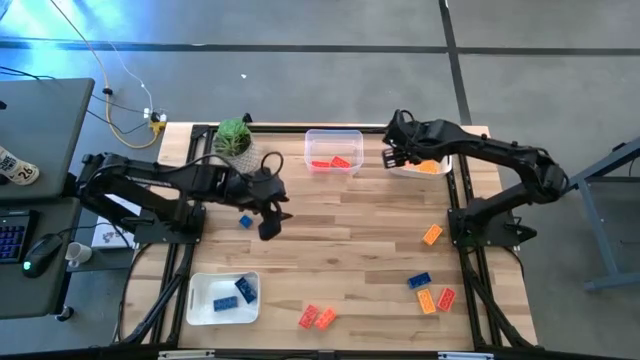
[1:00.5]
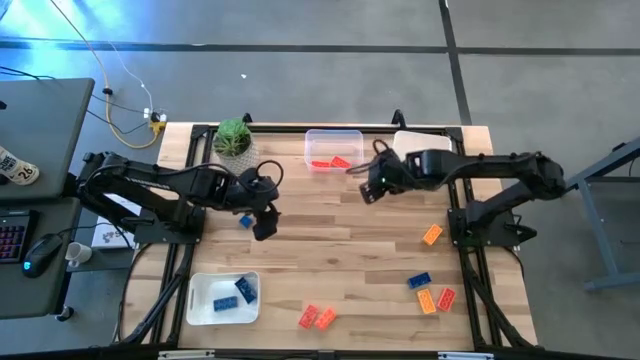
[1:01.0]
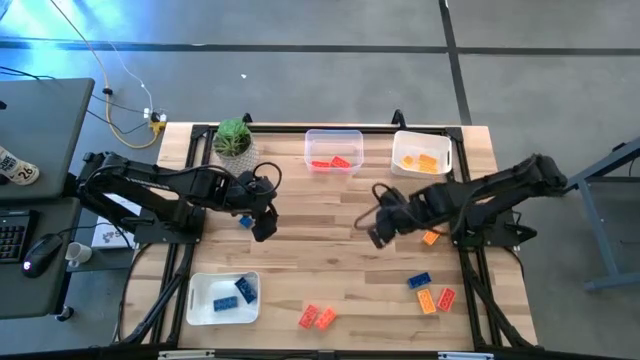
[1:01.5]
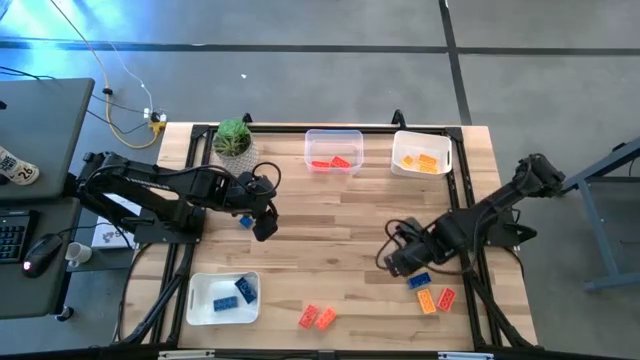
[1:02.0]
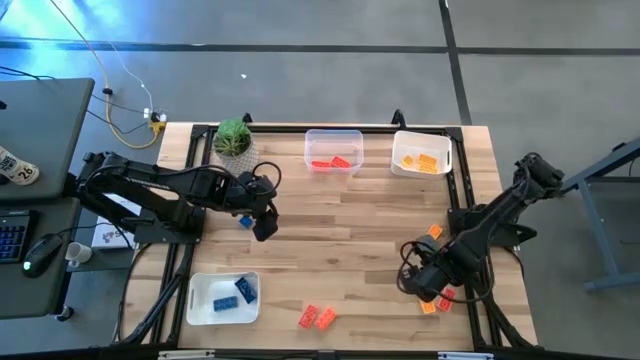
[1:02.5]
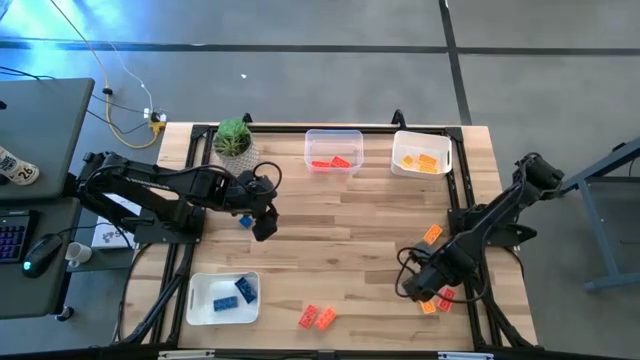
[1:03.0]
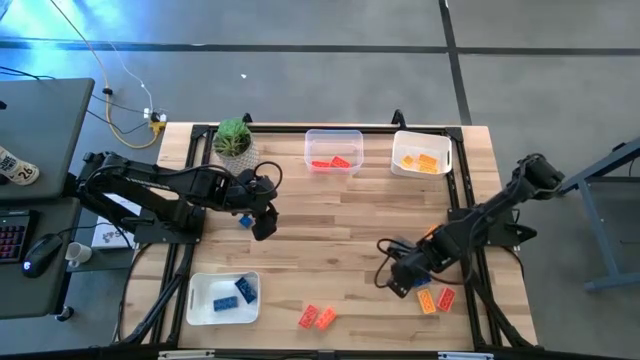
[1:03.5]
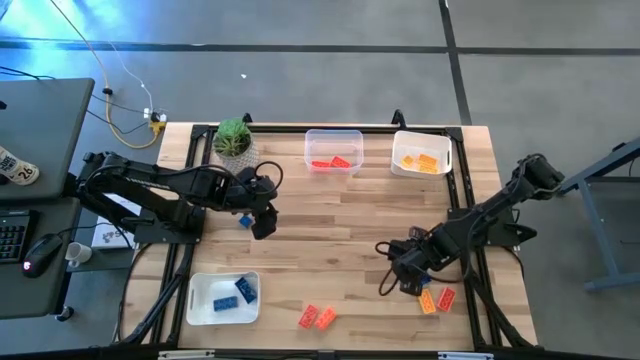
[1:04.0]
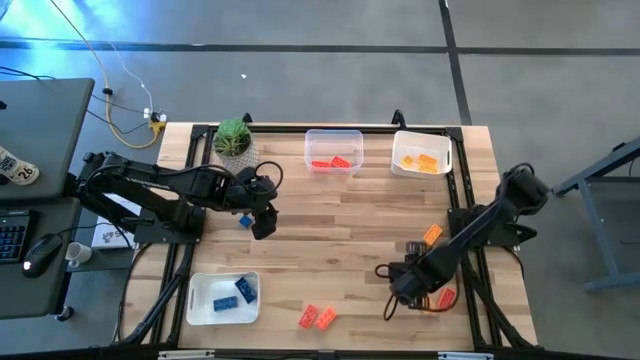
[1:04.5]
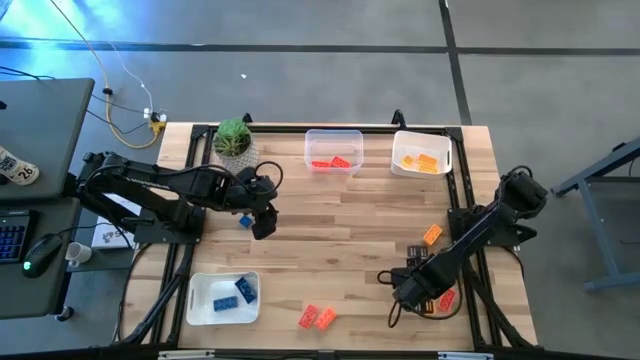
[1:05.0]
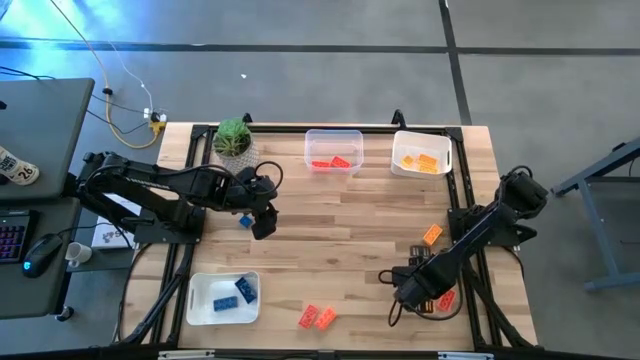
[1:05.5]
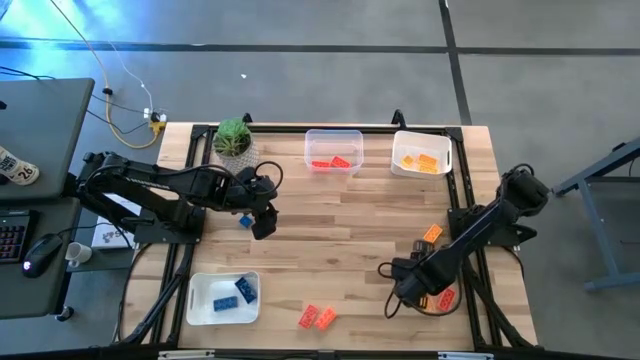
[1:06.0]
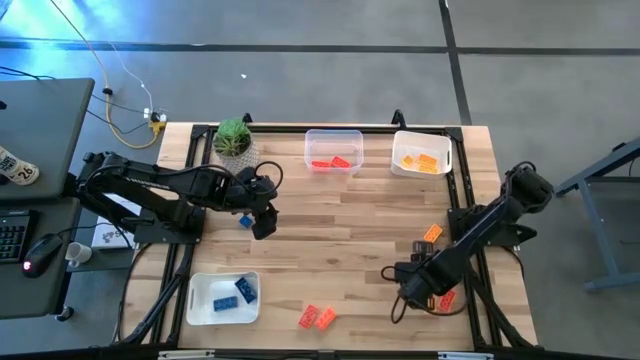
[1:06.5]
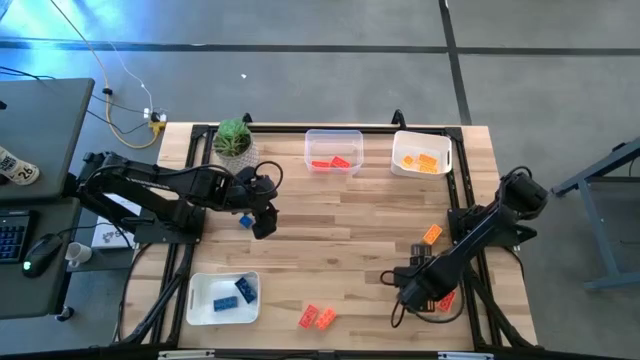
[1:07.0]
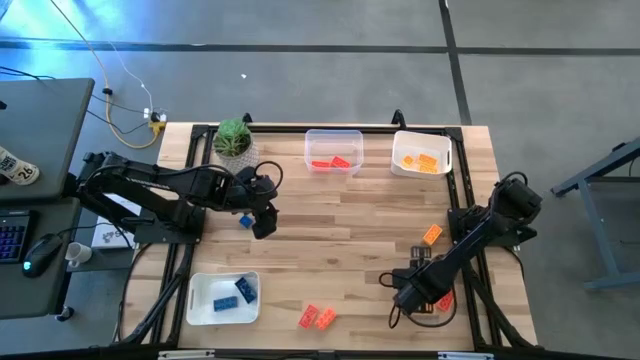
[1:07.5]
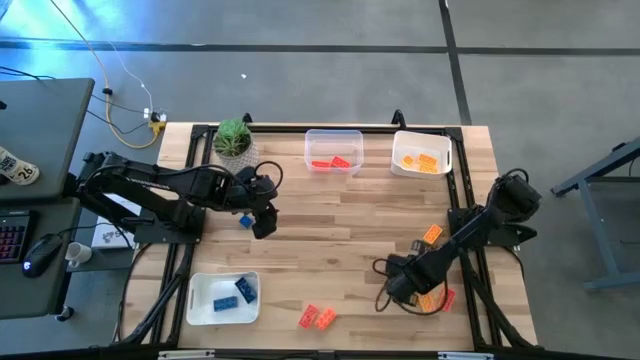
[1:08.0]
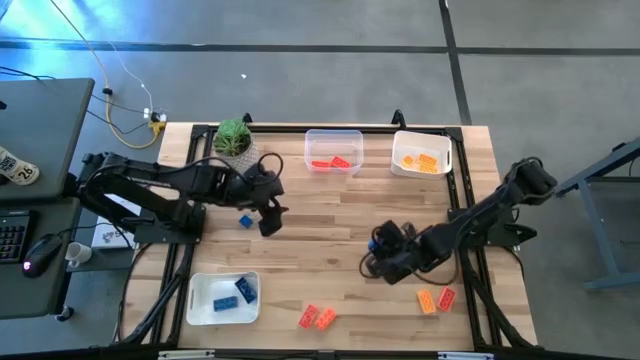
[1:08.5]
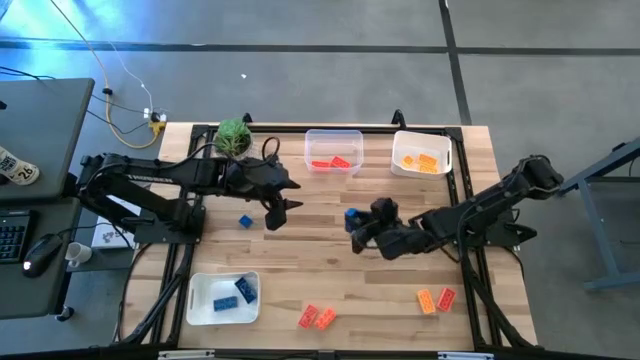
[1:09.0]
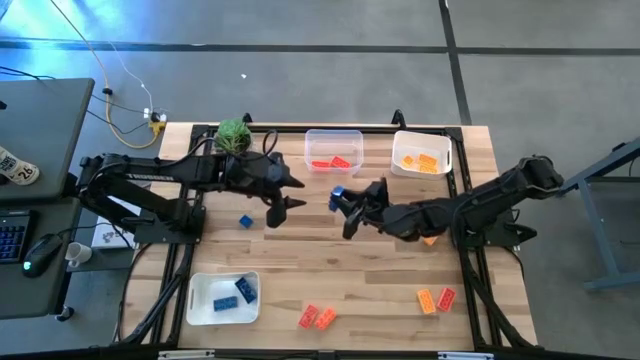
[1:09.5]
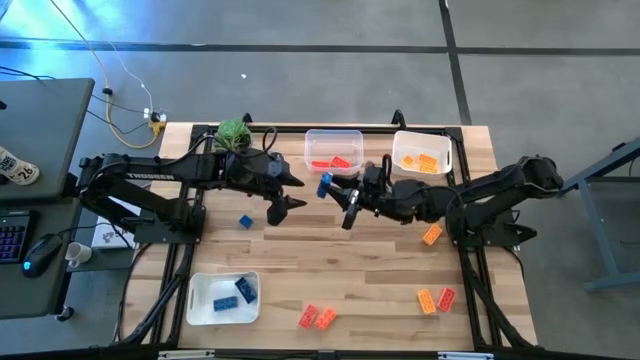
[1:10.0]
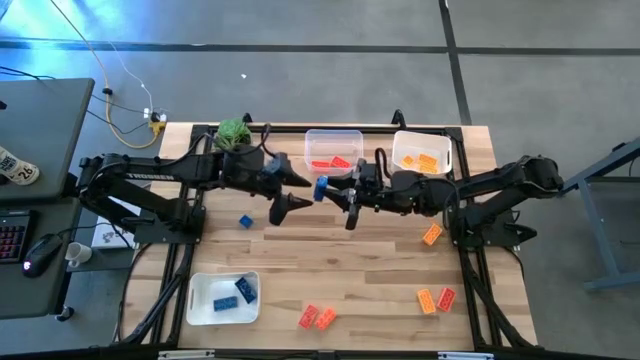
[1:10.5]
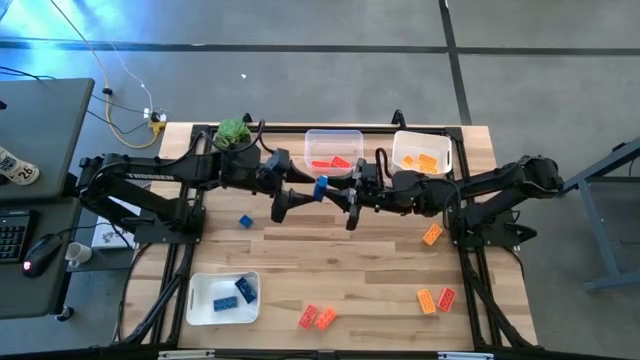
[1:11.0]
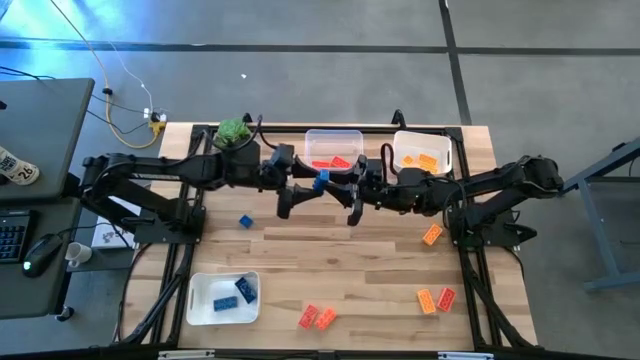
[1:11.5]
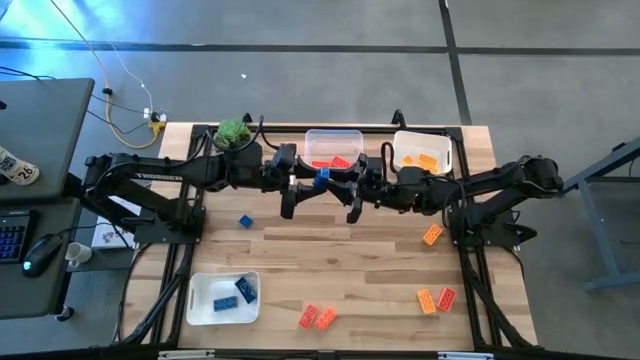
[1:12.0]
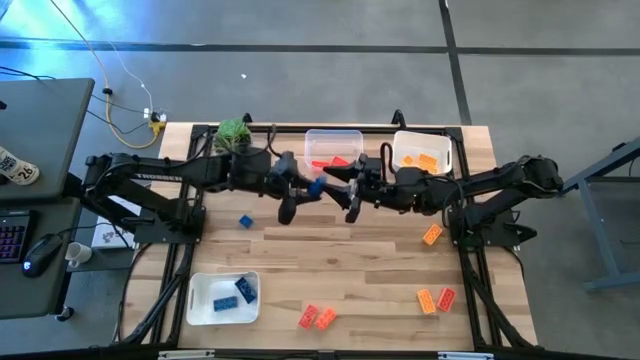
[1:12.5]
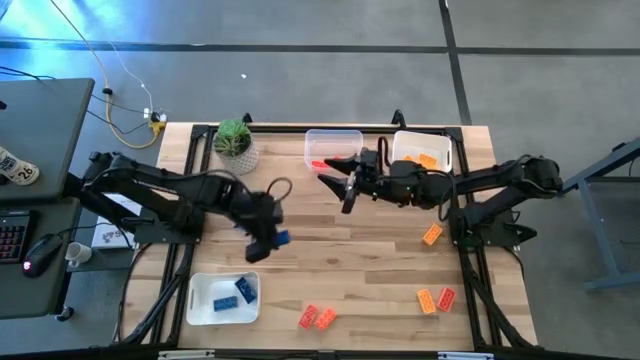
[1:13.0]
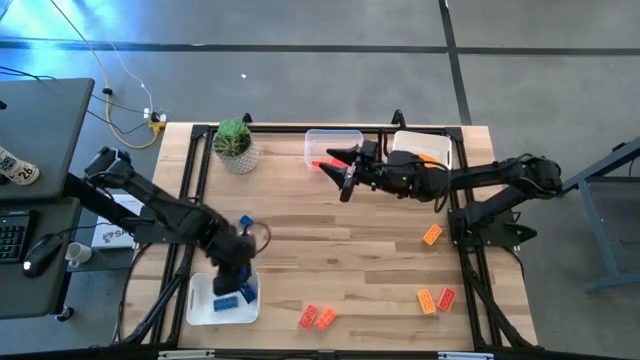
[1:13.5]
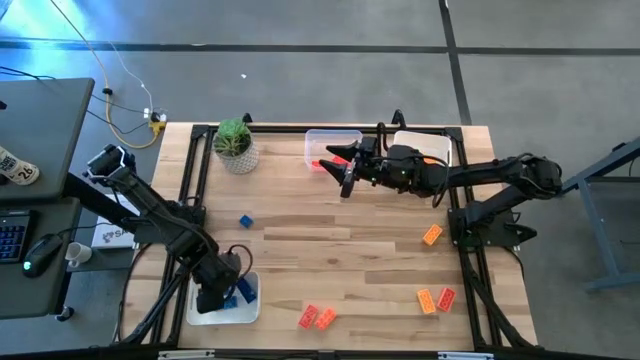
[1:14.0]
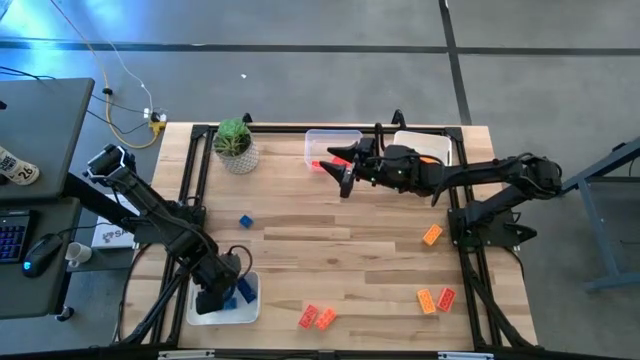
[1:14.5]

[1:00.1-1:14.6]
Task: Sort & place blocks by color
Put the blue game piece into the bottom white bin

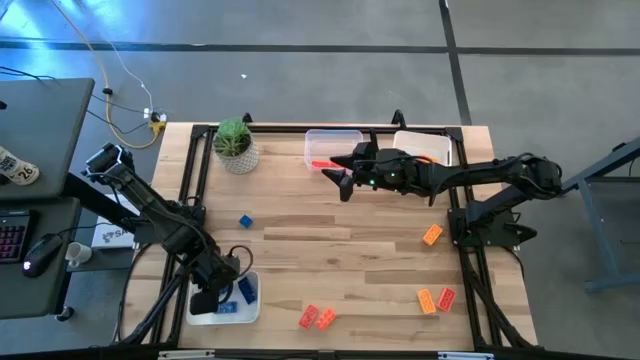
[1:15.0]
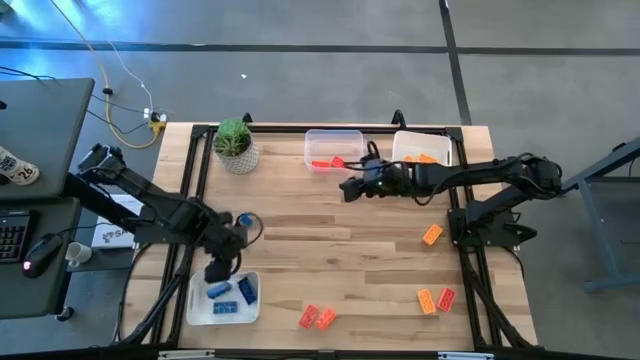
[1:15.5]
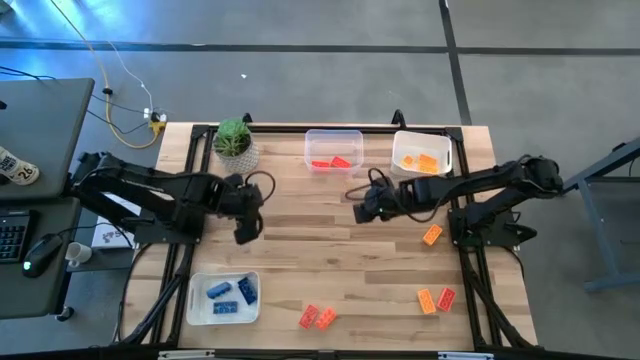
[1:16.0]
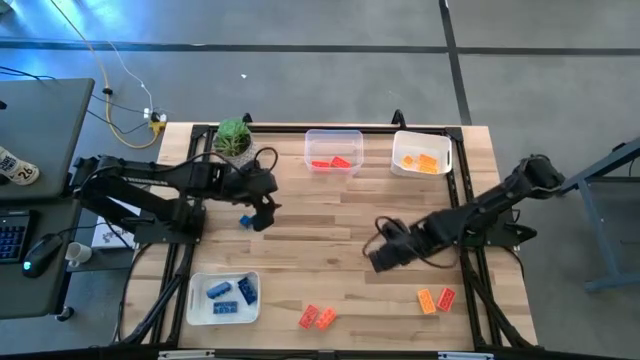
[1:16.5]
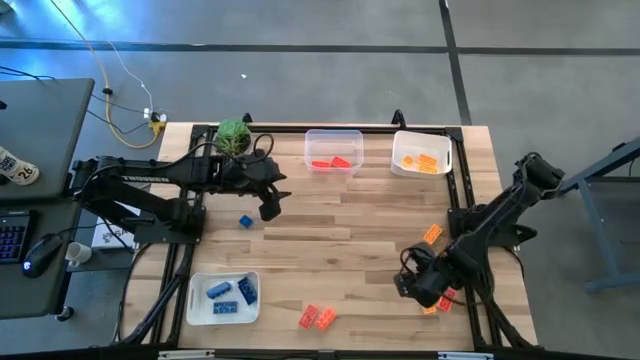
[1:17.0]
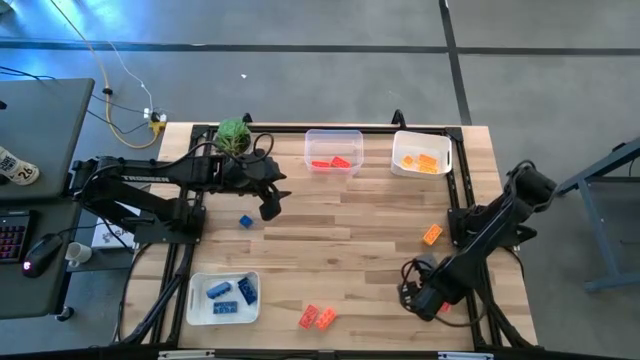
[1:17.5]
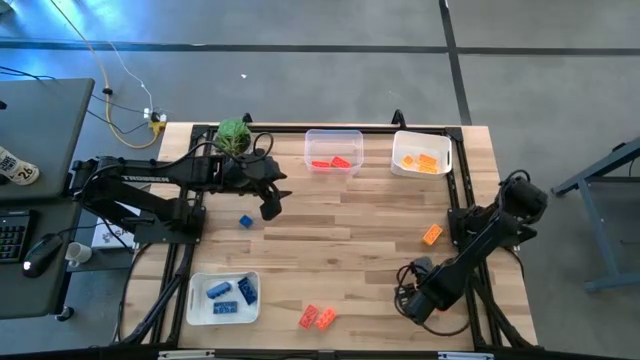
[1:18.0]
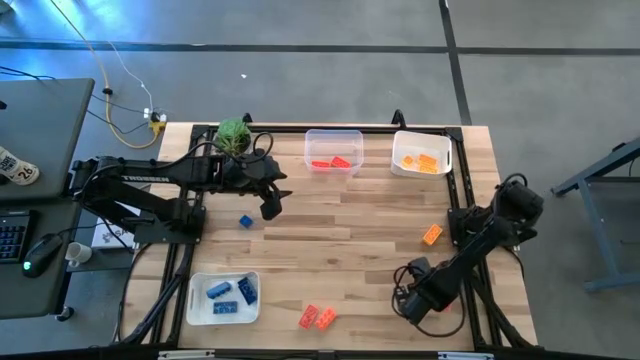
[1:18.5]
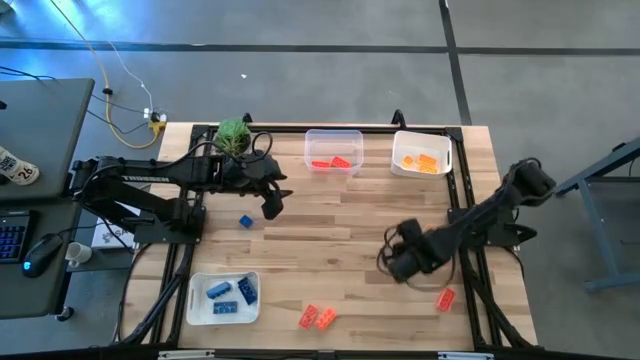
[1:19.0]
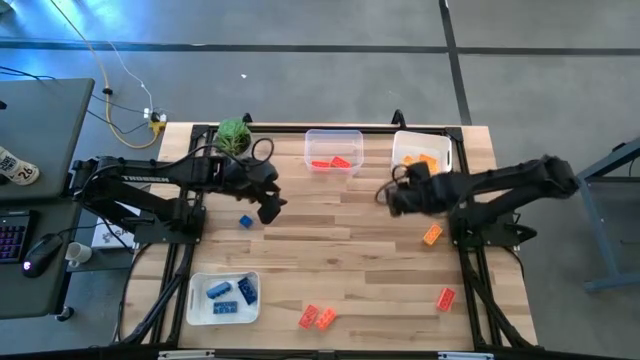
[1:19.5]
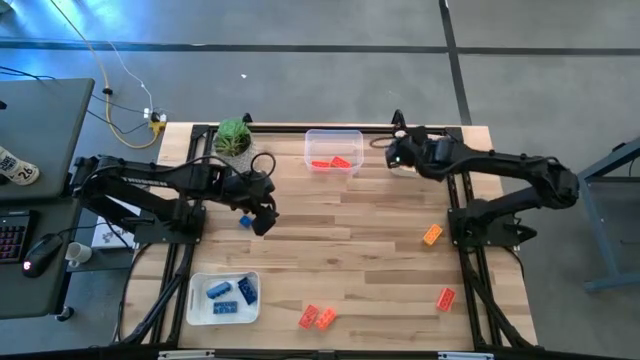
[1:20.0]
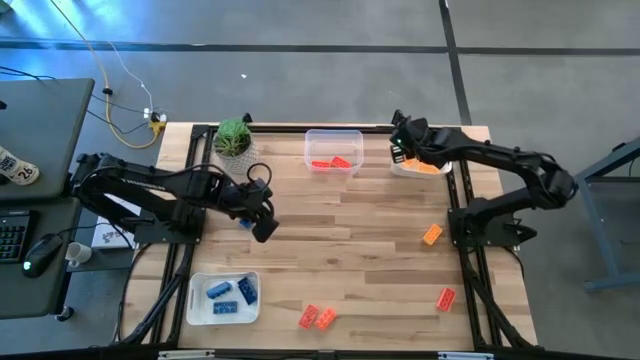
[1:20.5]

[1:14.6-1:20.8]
Put the yellow game piece into the top white bin

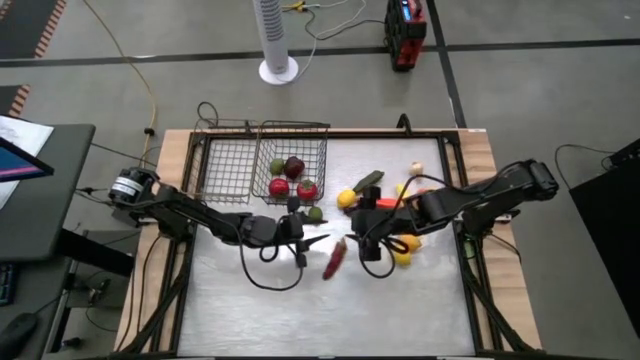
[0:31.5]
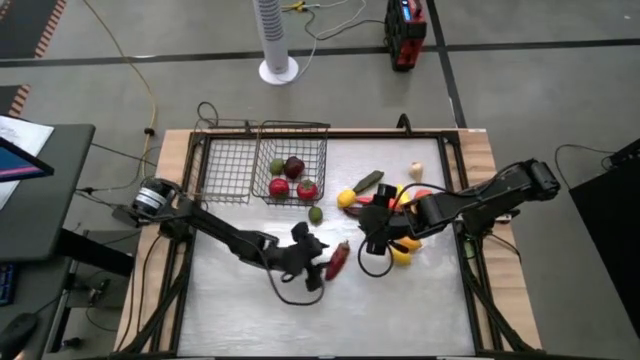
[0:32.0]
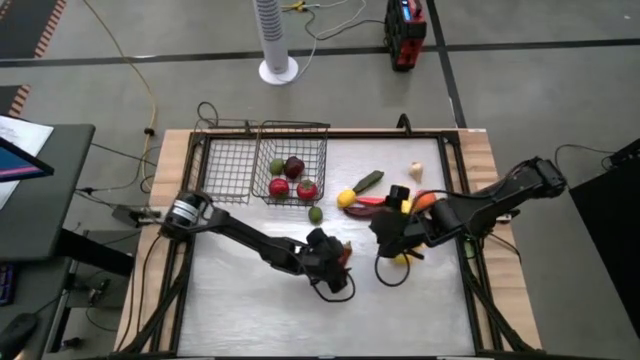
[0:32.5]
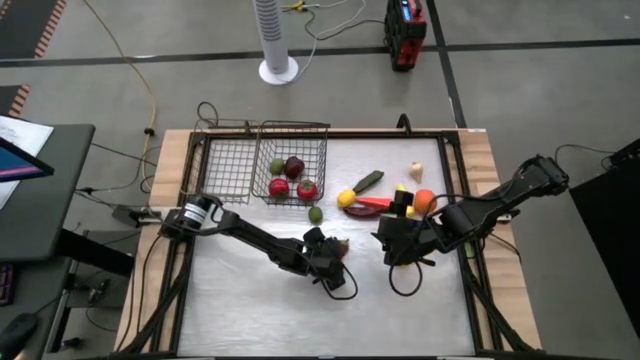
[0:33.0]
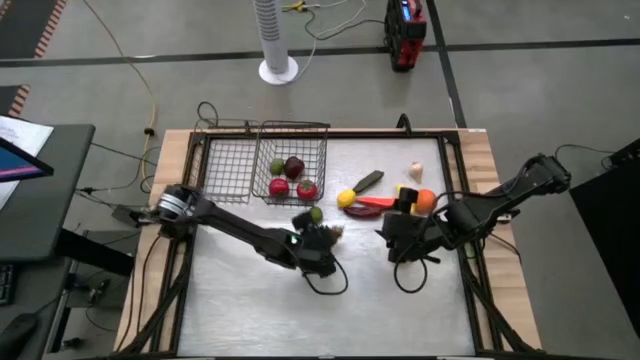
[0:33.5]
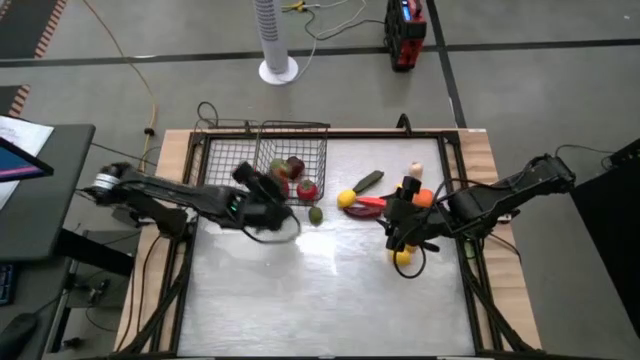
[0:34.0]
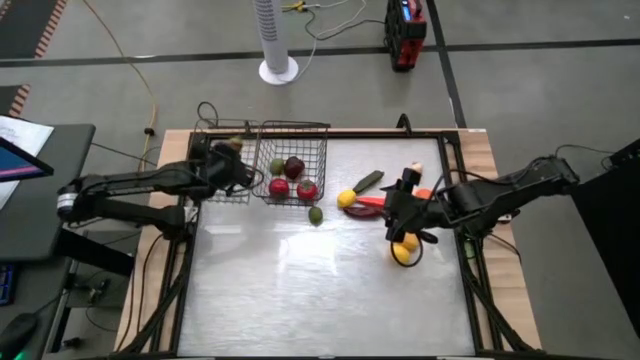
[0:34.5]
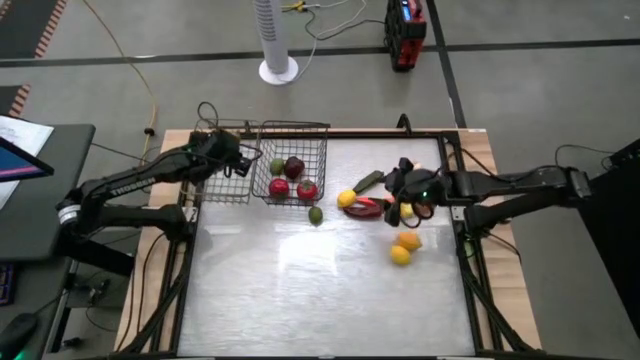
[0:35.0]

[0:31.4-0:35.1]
Task: Sort produce into baskets
Put the bottom red chili pepper into the left wire basket
